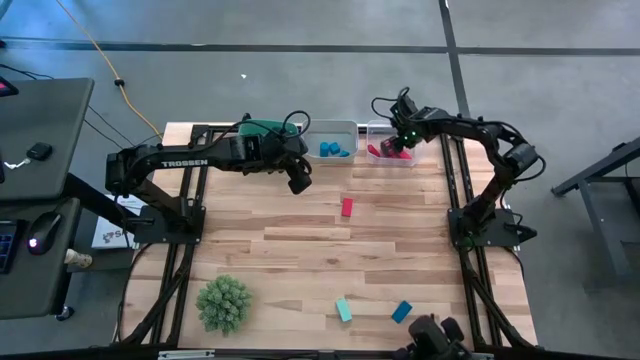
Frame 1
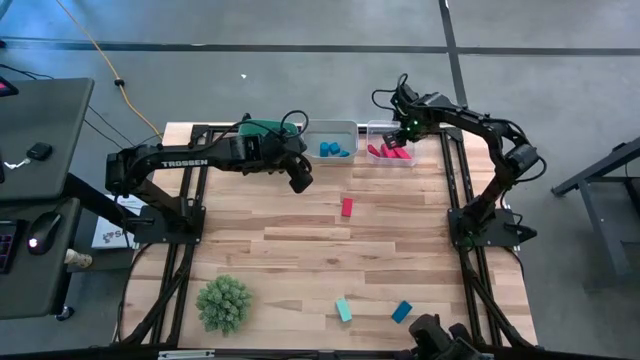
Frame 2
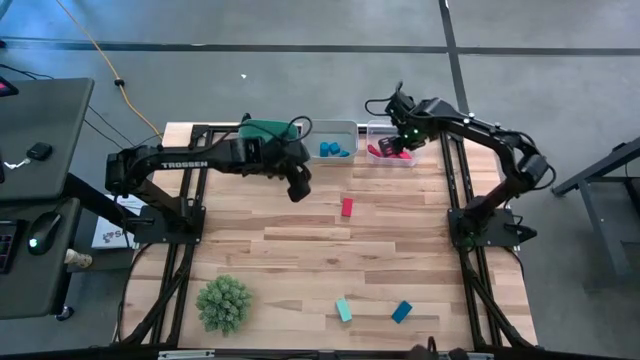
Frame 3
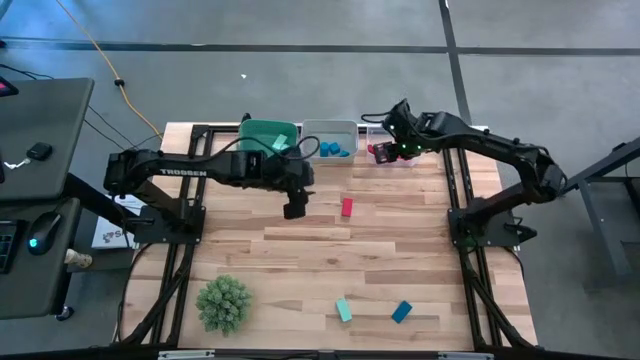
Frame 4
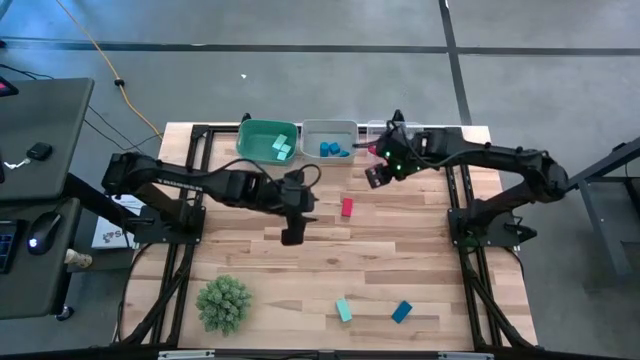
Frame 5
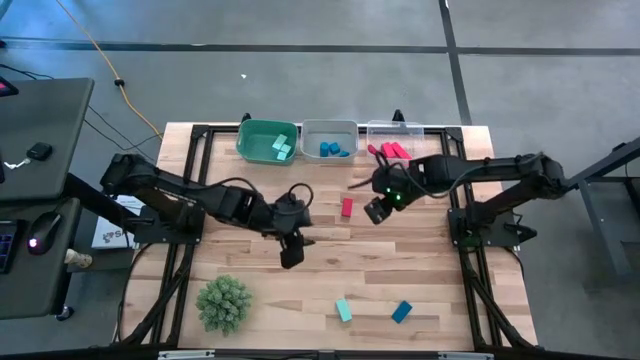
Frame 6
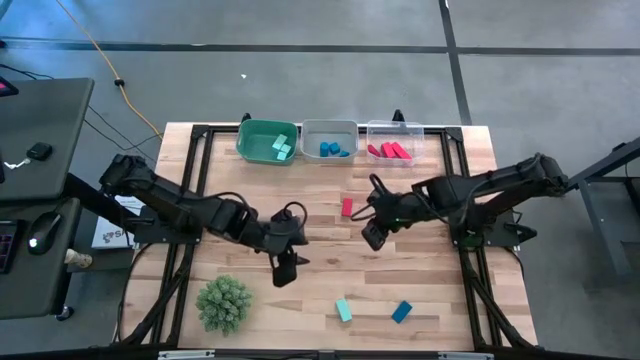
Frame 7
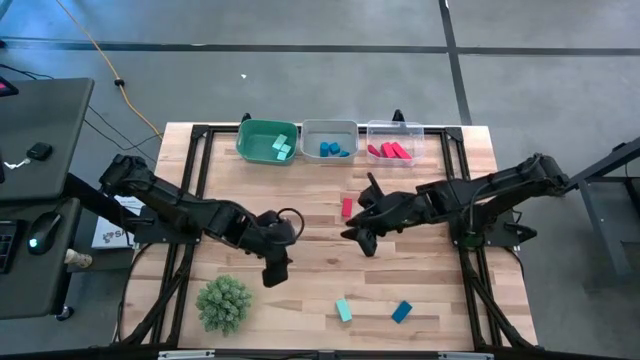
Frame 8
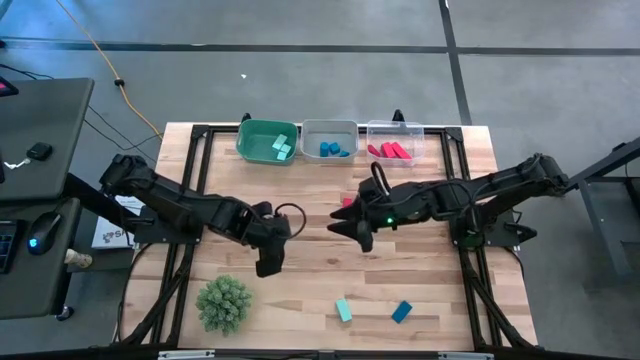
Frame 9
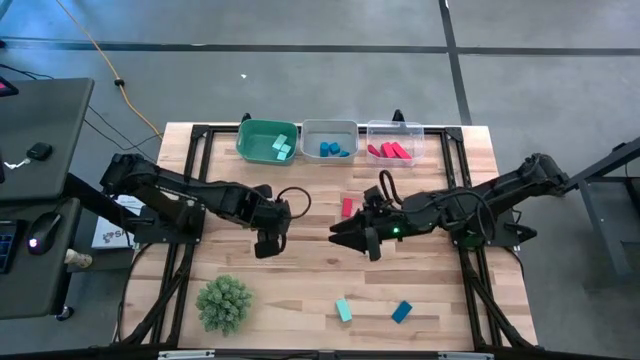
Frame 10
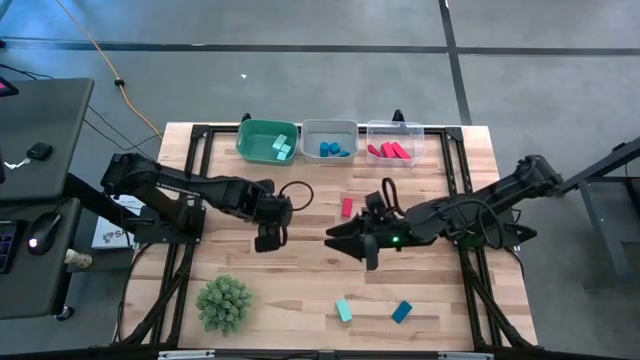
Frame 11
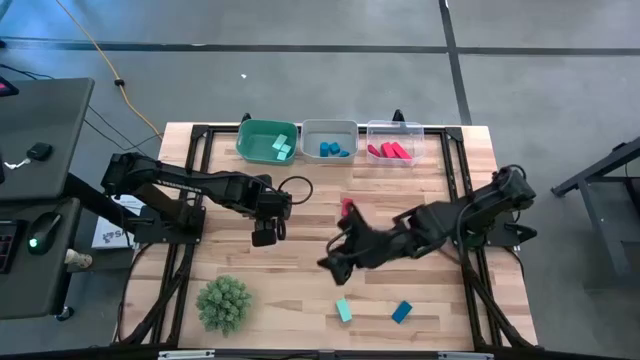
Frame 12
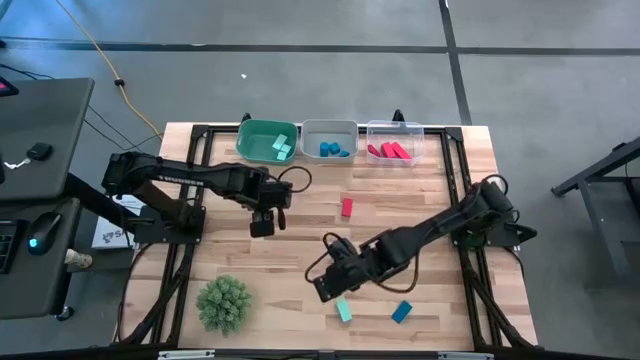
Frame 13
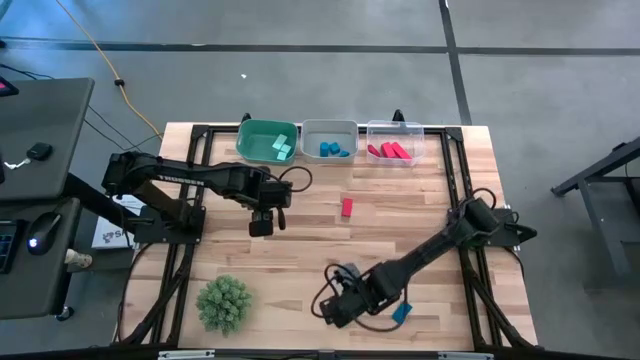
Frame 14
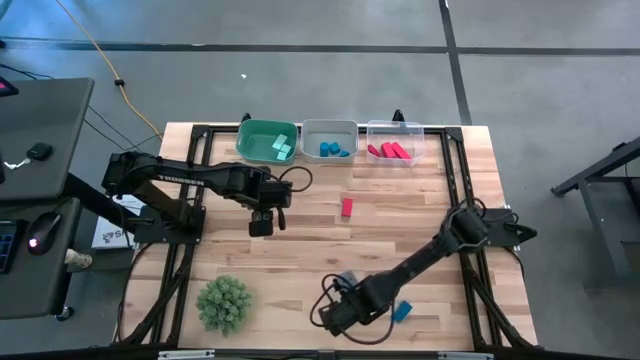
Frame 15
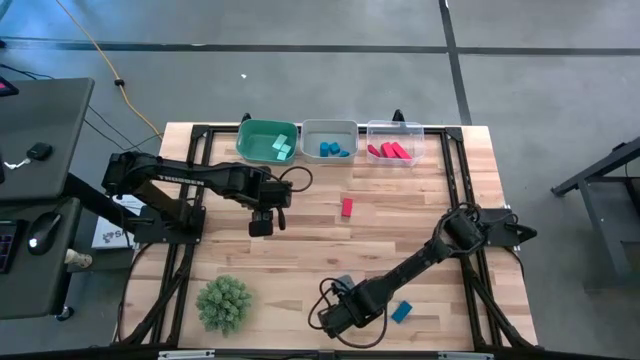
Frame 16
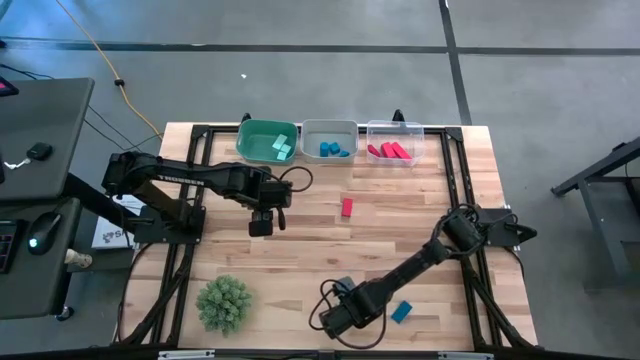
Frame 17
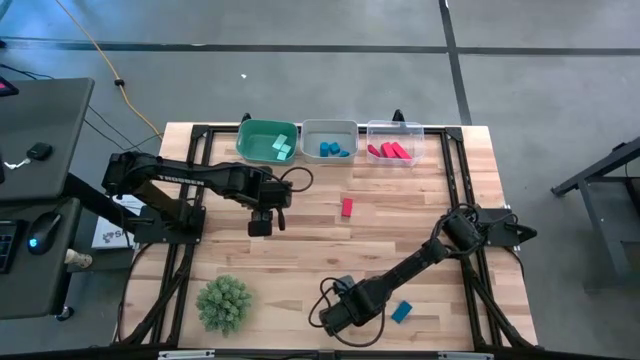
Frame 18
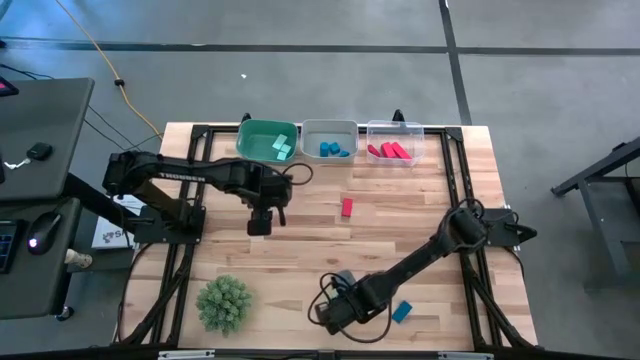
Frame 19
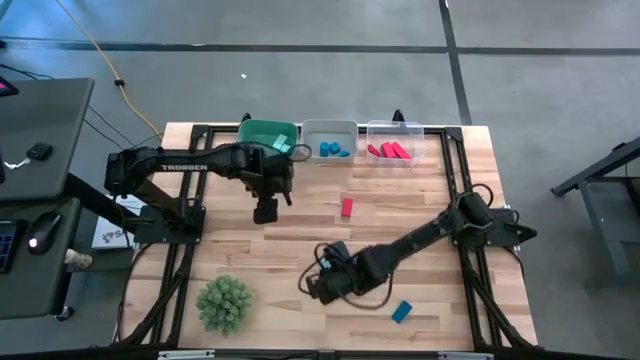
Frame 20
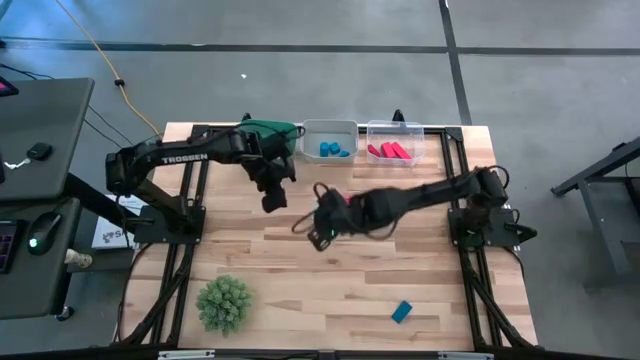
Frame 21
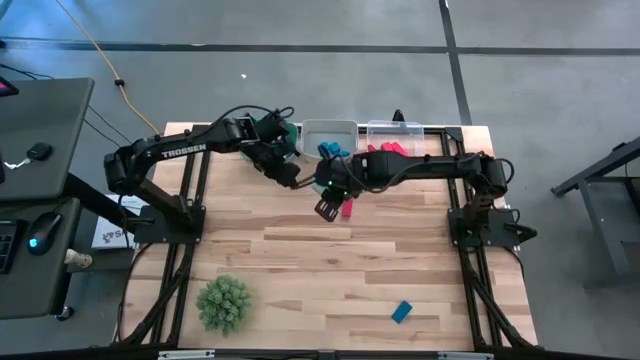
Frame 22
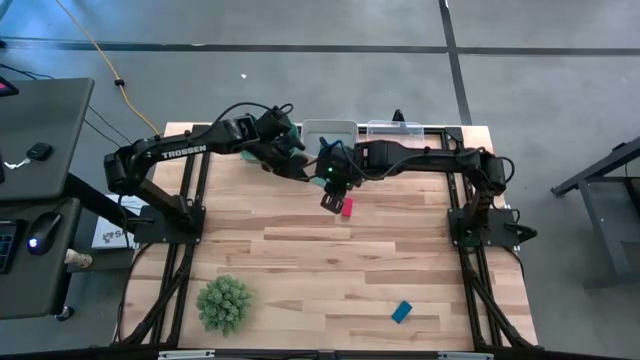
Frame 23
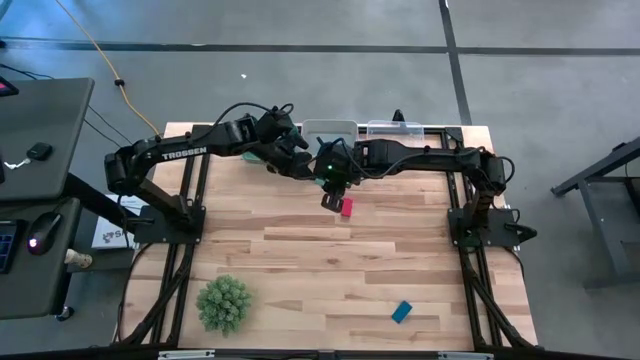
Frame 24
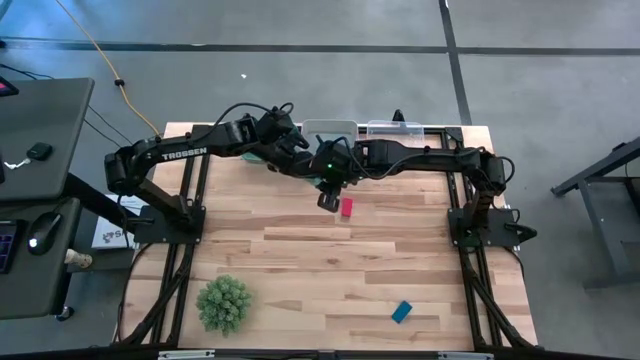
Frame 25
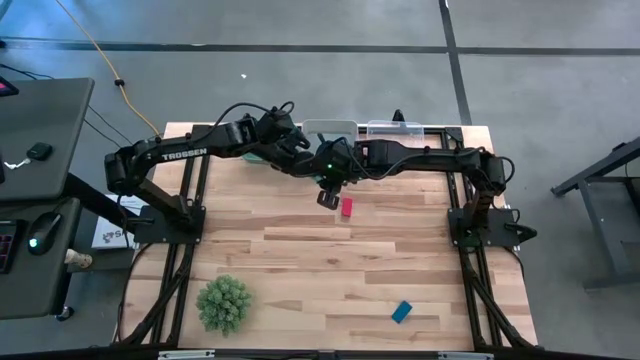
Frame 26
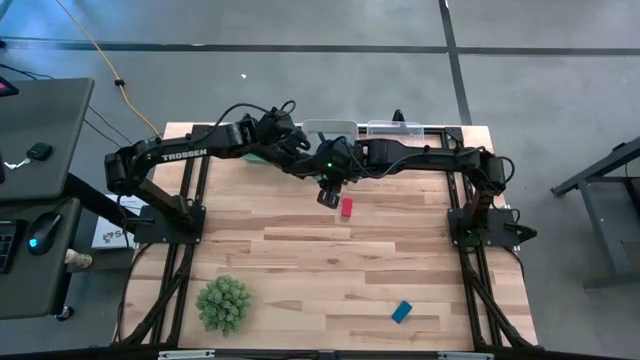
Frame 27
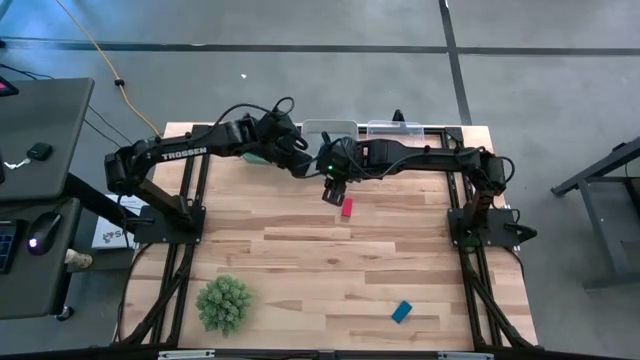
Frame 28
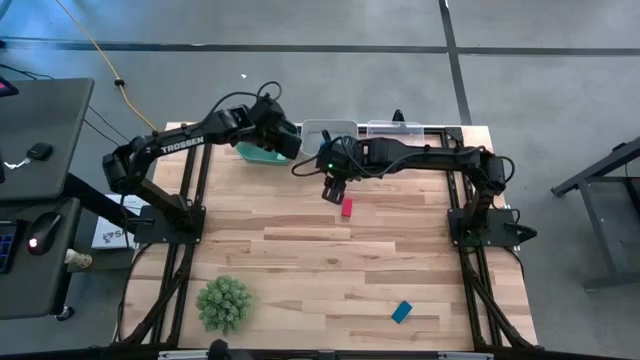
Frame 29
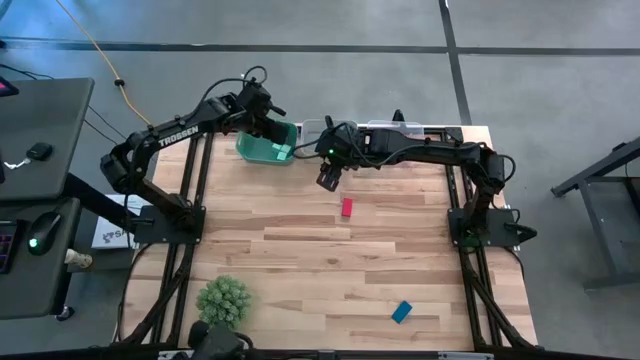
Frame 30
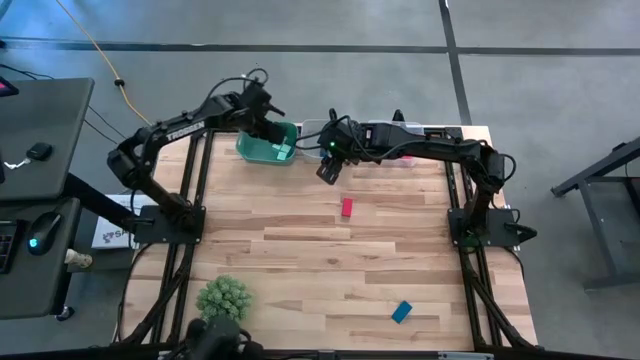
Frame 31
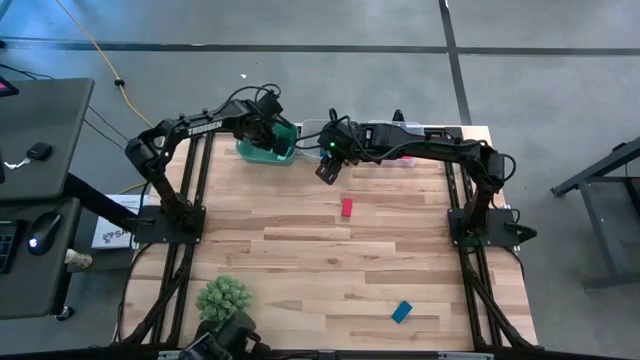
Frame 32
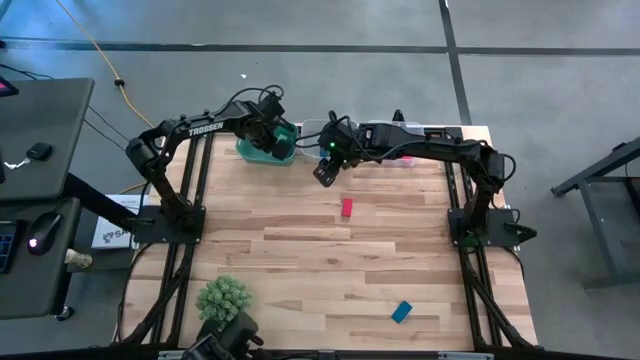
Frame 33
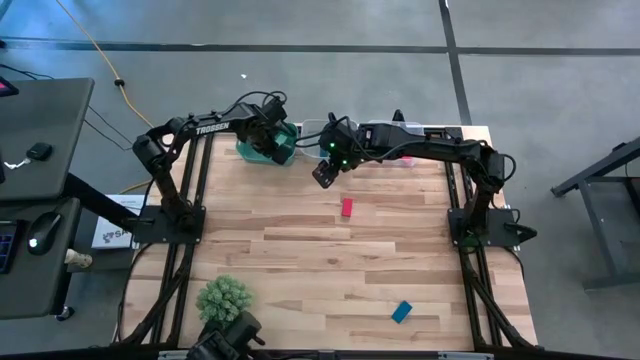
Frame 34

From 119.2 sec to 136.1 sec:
Task: Sort & place blocks by color
Put the light blue block into the green bin

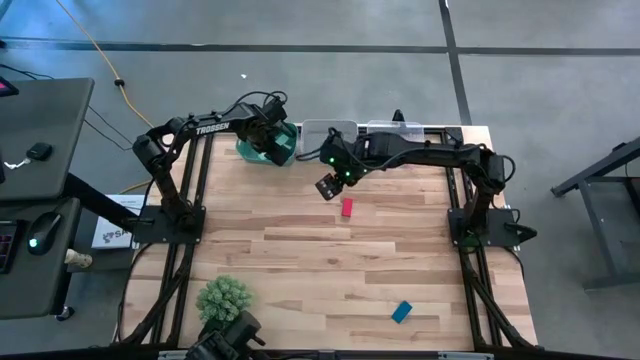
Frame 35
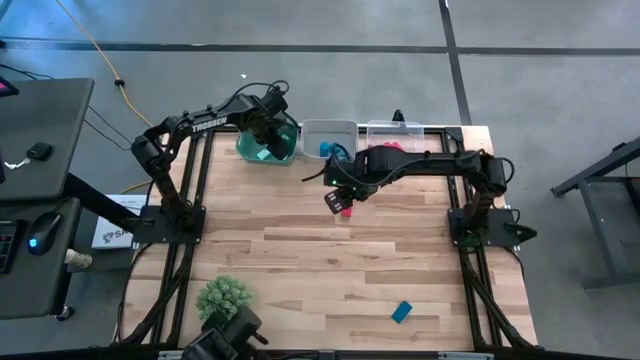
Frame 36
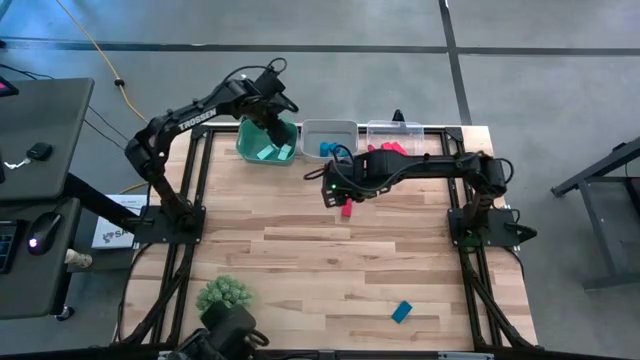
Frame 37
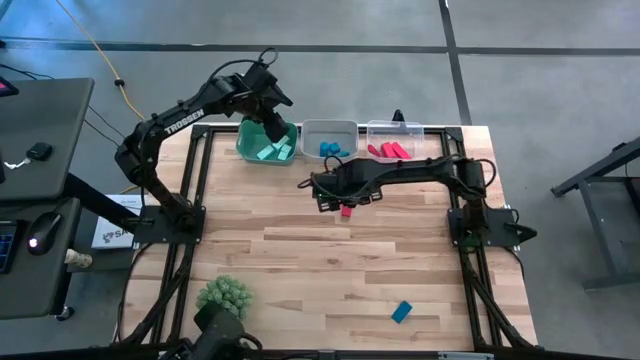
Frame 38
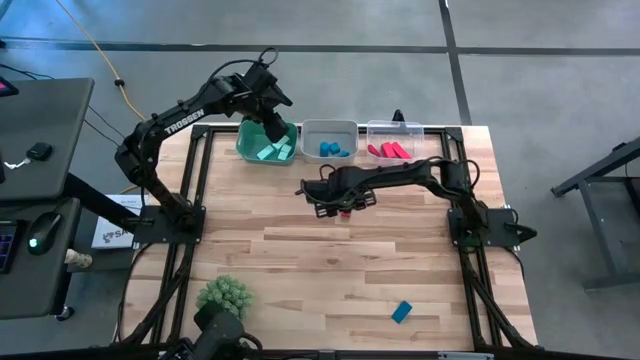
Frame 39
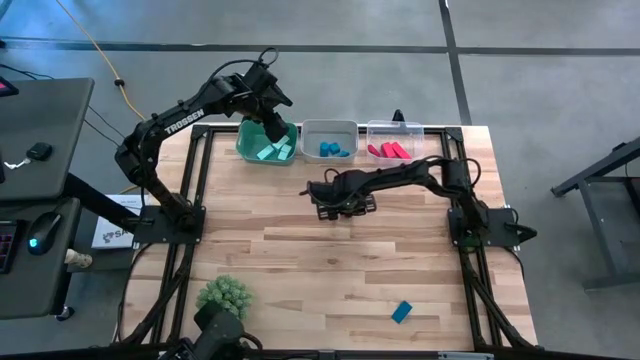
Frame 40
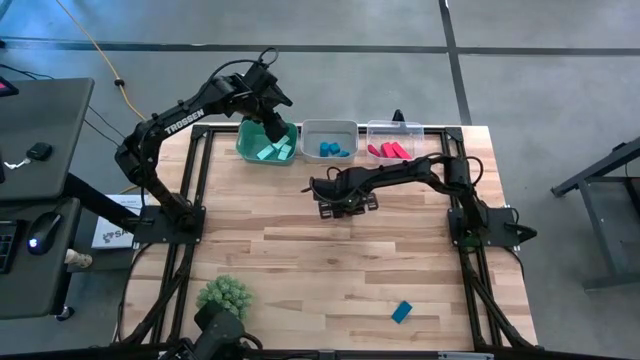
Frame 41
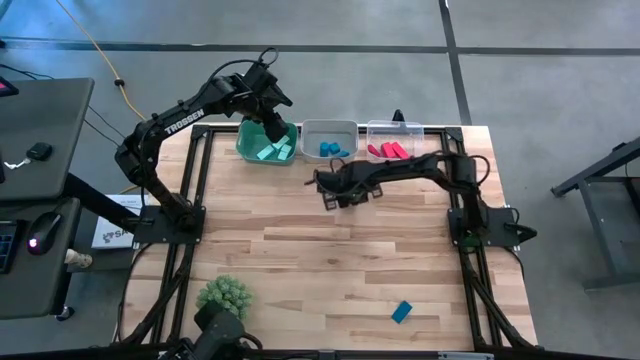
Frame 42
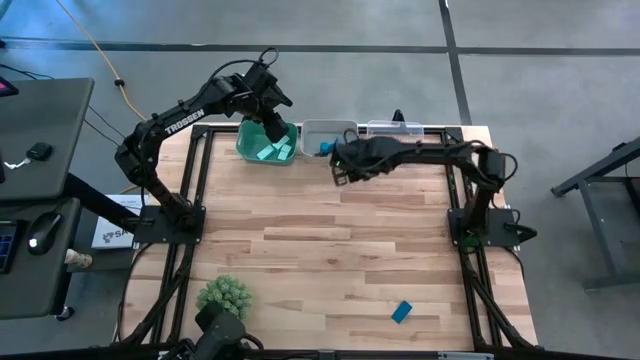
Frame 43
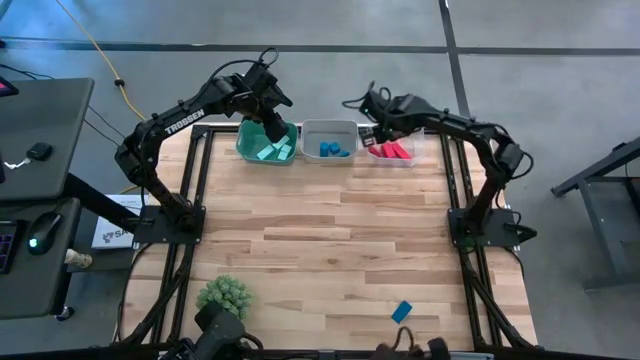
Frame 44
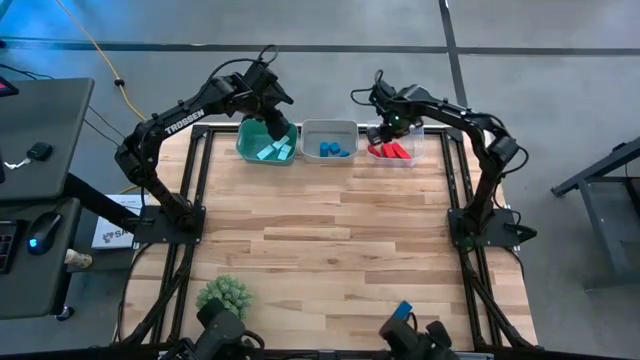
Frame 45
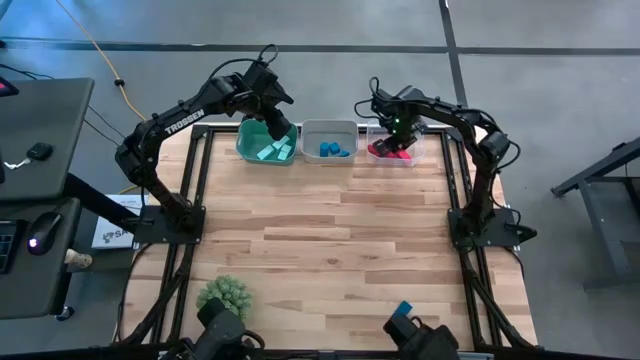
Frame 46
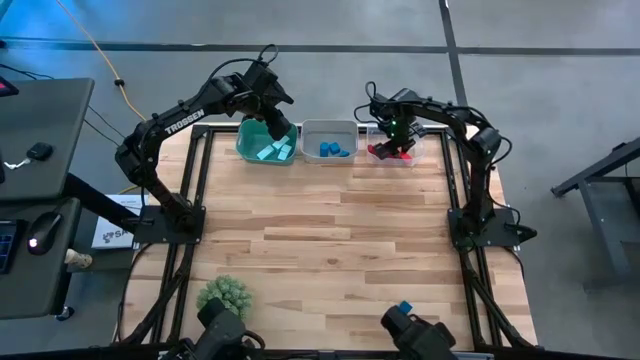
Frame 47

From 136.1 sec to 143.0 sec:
Put the red block into the transparent bin
